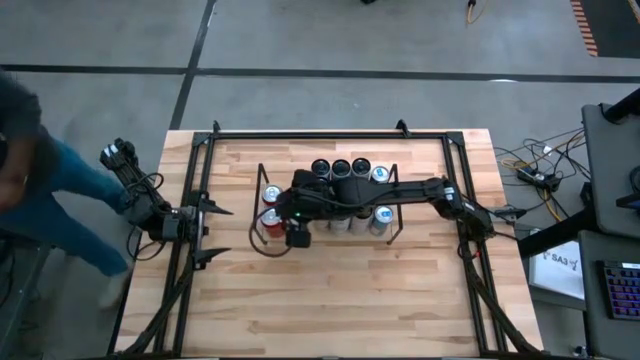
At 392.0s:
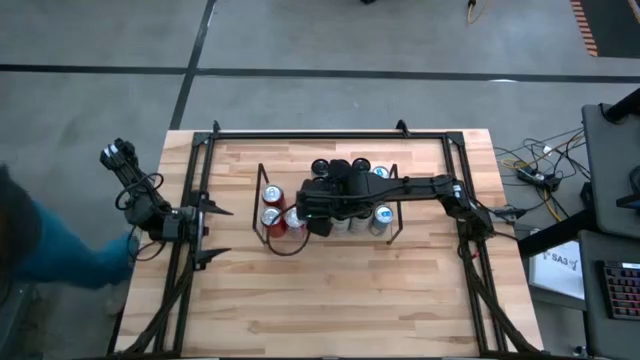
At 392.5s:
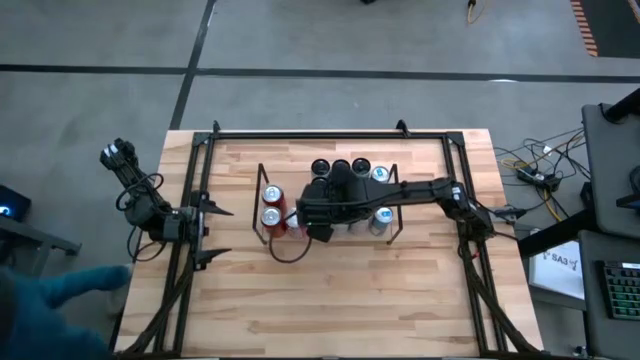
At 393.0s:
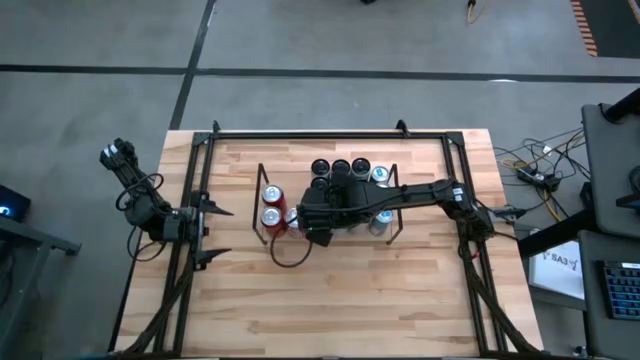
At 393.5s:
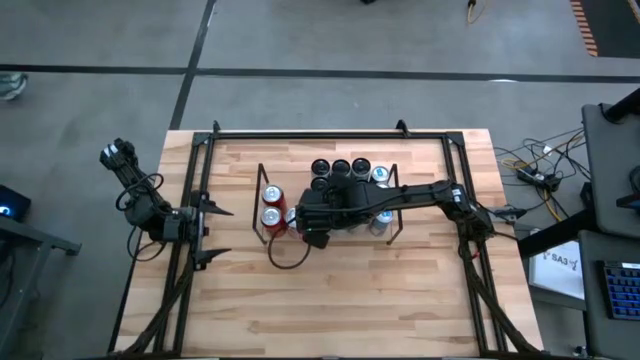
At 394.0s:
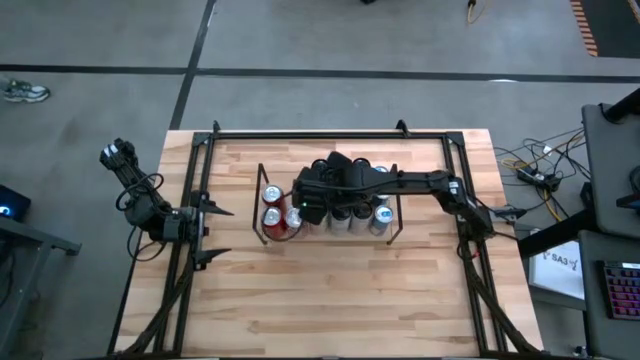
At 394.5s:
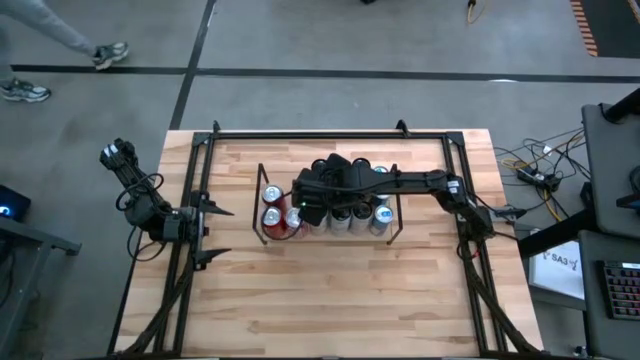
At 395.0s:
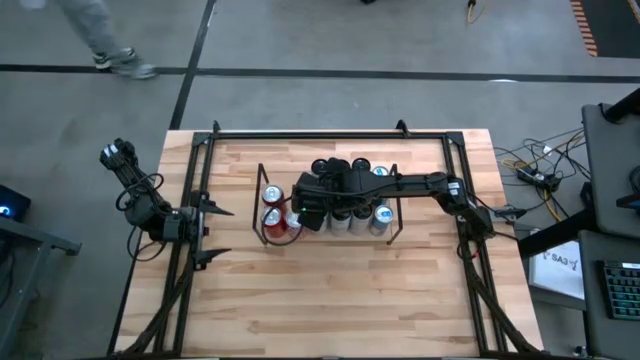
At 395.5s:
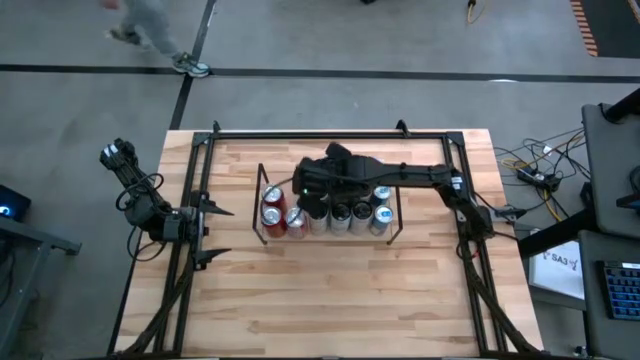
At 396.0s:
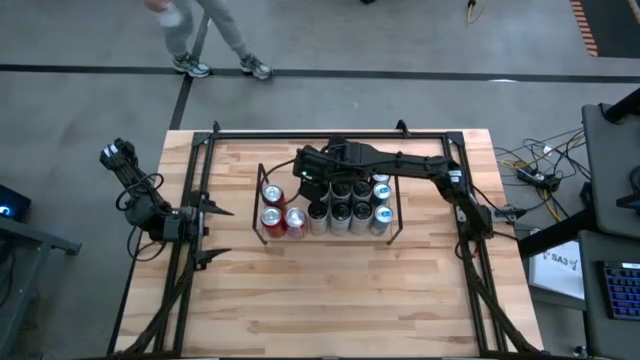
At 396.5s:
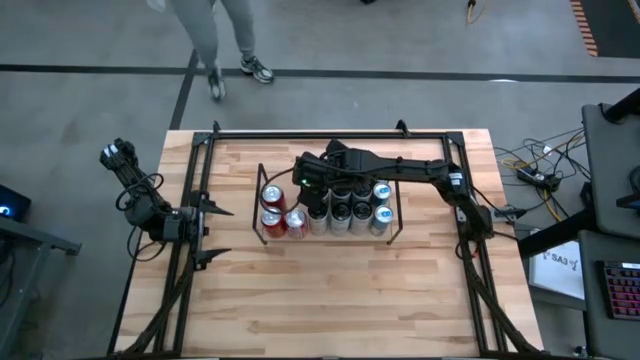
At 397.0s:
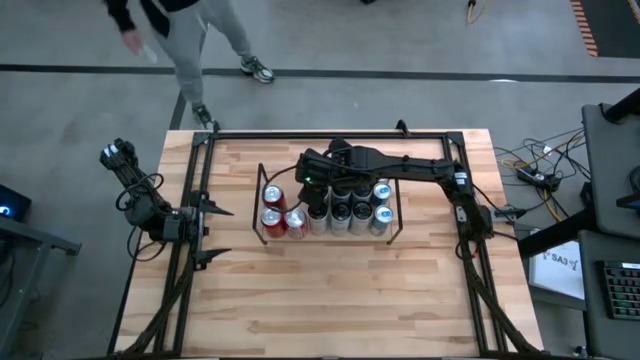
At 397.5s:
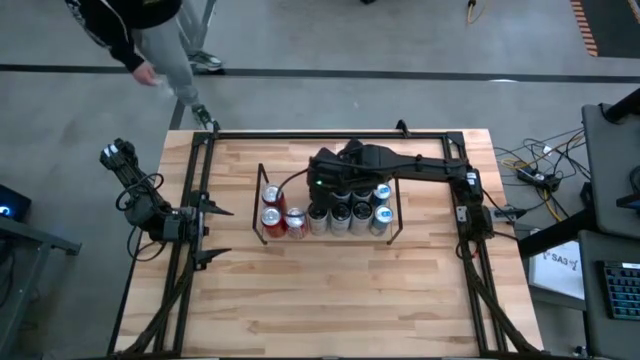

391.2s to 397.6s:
Task: Place canned beverage on shelf
Adjust the white and pink soda cans

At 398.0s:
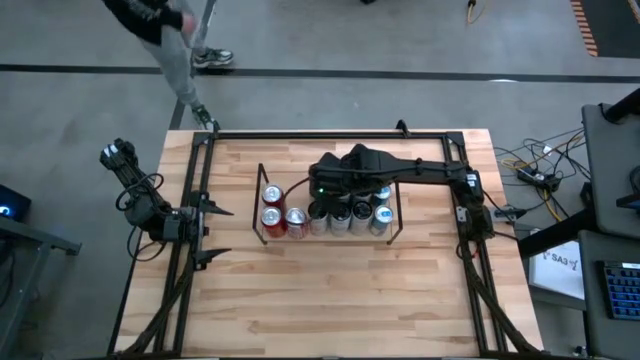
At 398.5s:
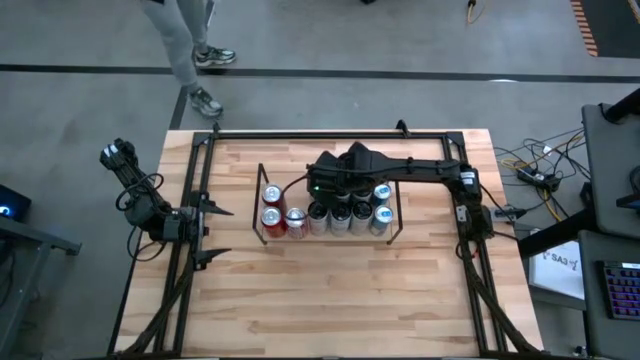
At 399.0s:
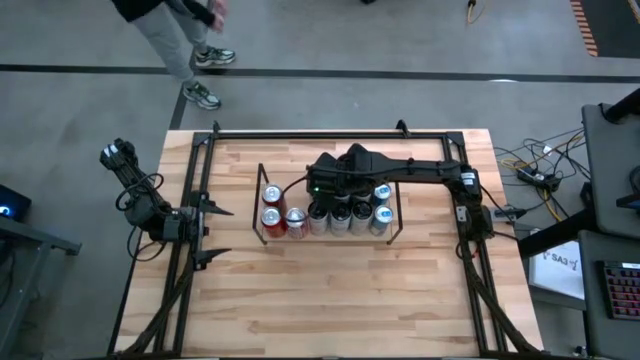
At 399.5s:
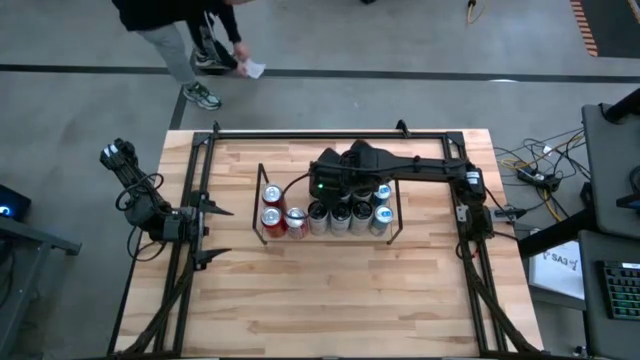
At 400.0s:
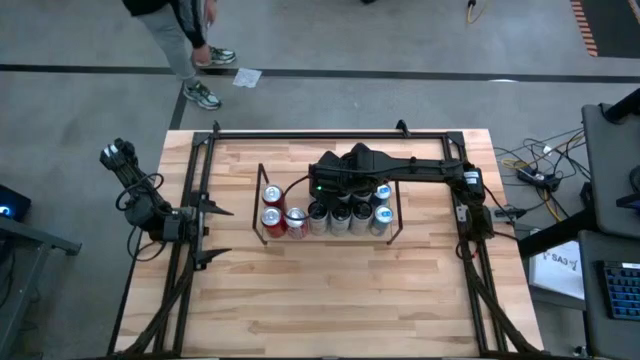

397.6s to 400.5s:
Adjust the white and blue soda cans

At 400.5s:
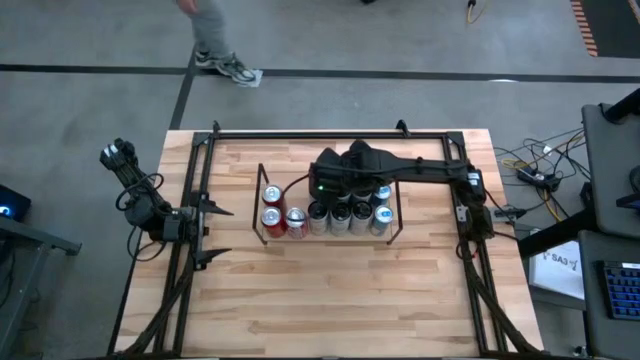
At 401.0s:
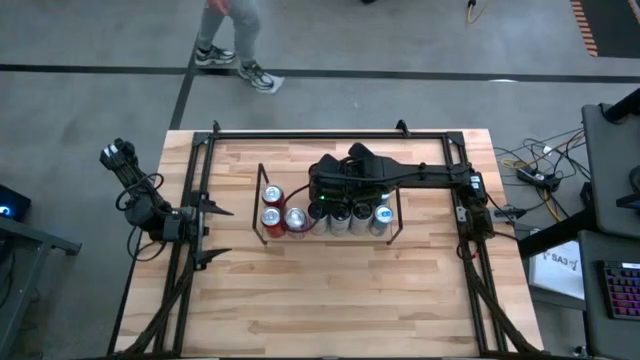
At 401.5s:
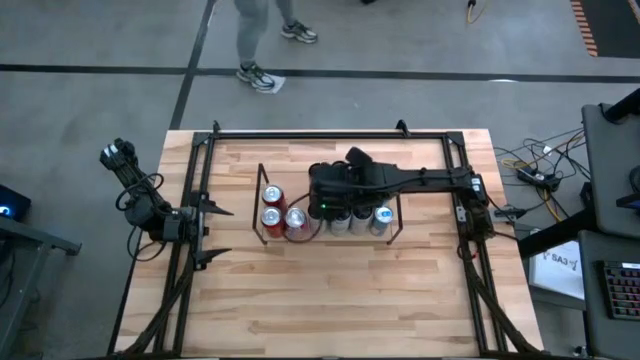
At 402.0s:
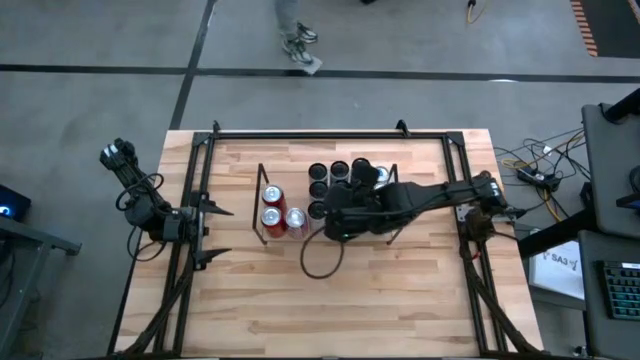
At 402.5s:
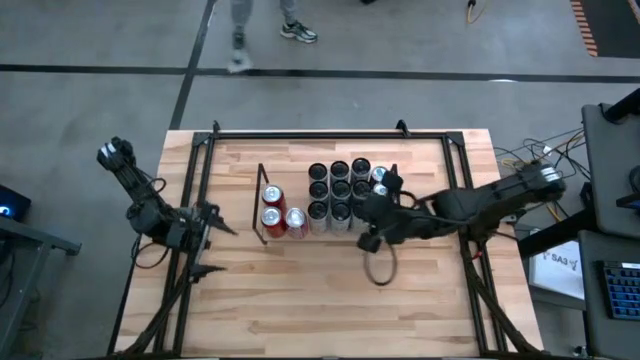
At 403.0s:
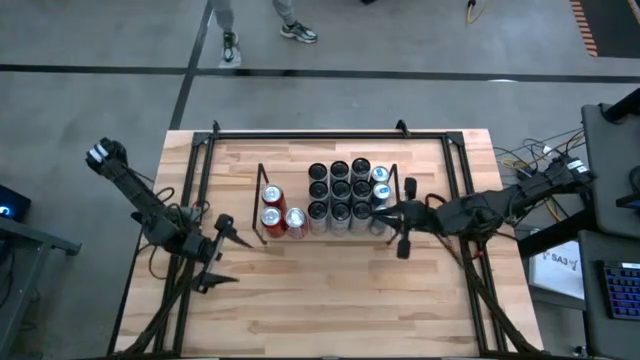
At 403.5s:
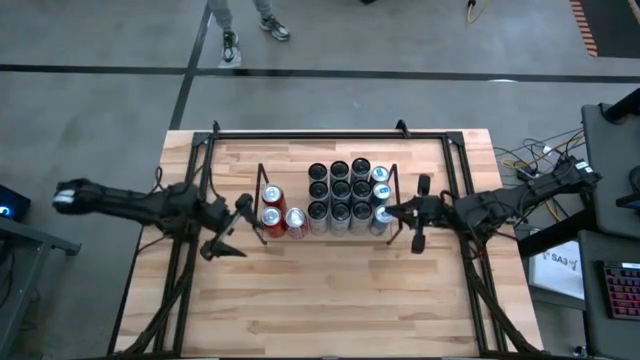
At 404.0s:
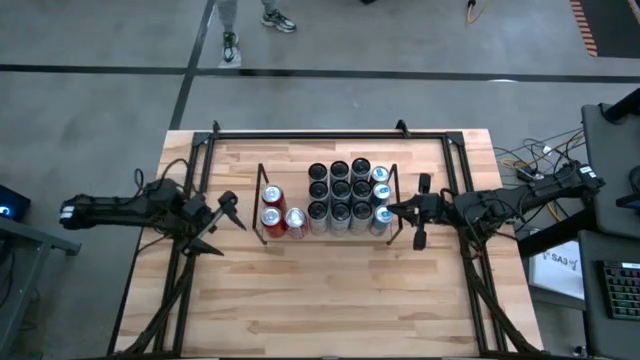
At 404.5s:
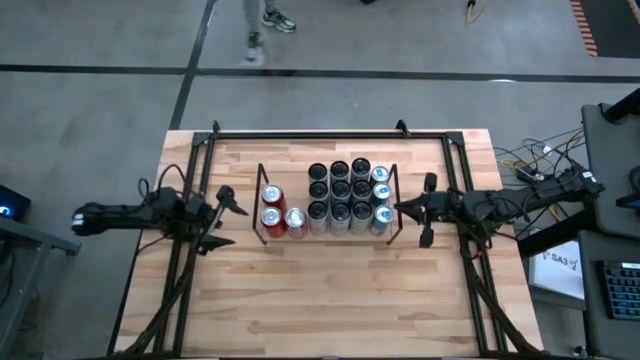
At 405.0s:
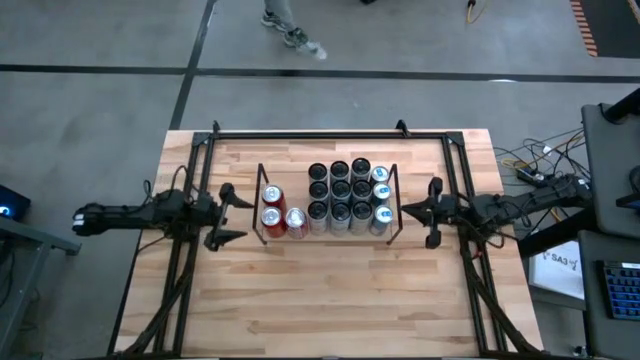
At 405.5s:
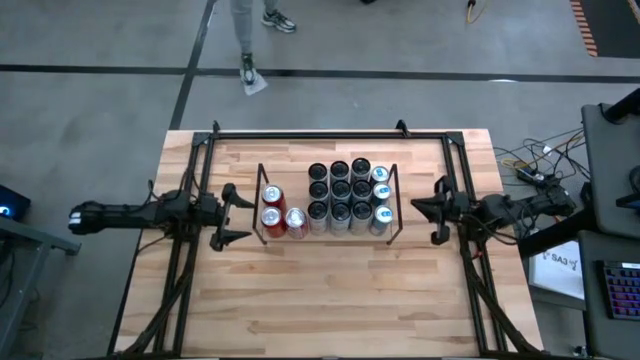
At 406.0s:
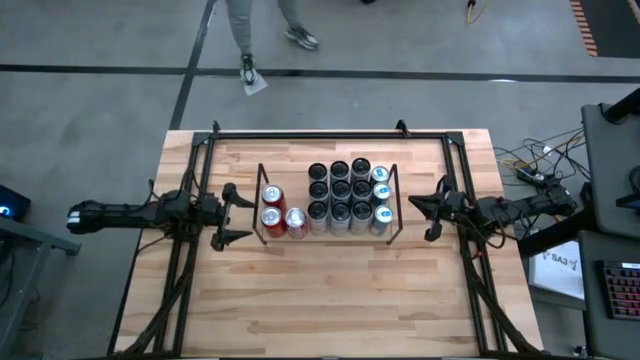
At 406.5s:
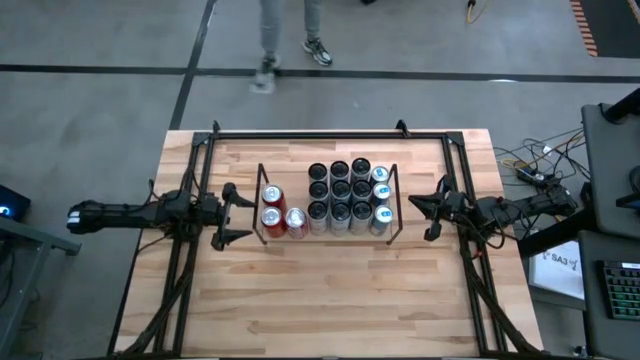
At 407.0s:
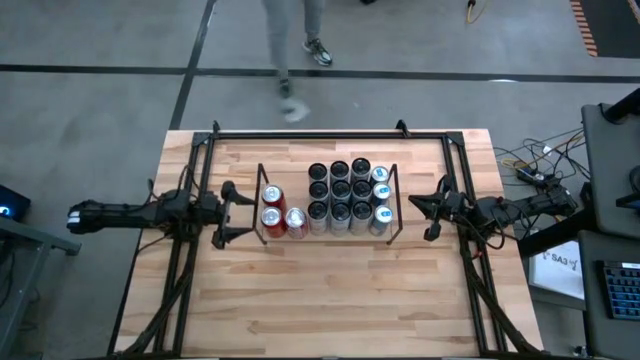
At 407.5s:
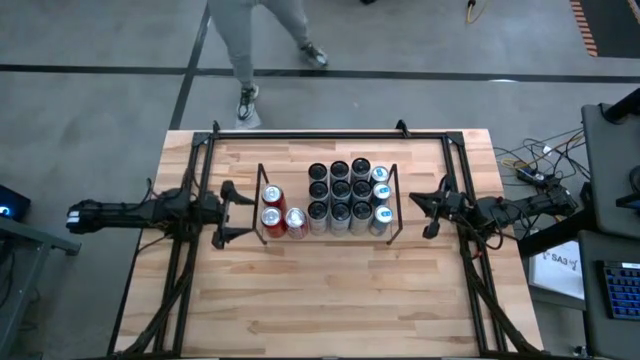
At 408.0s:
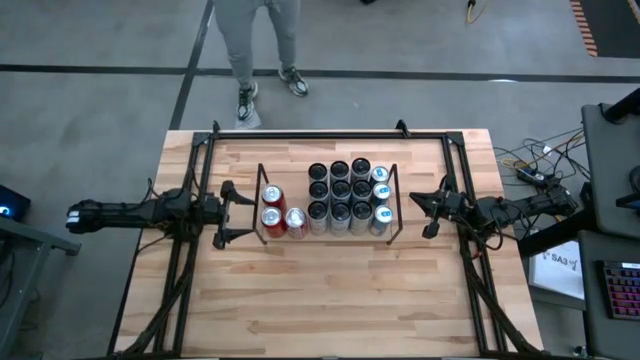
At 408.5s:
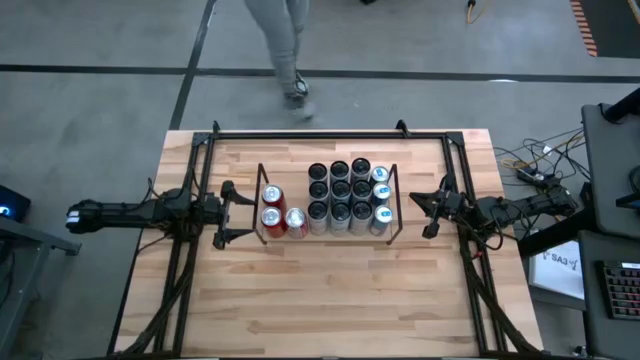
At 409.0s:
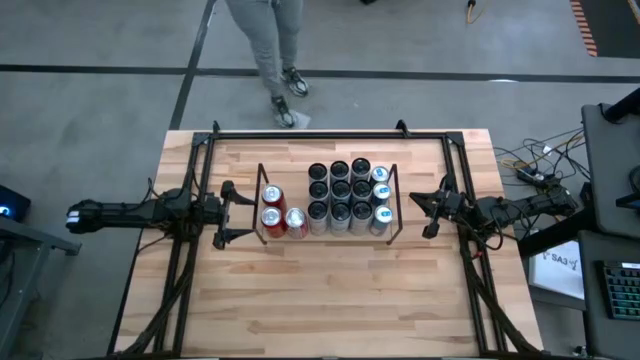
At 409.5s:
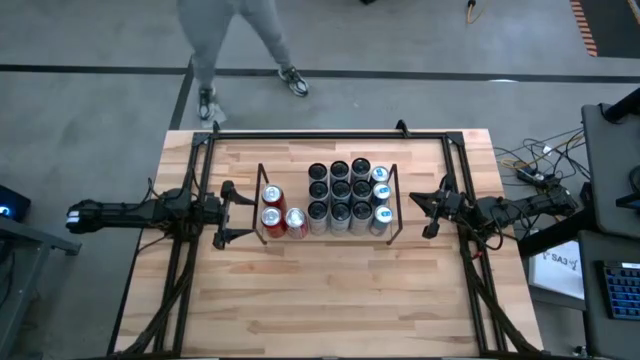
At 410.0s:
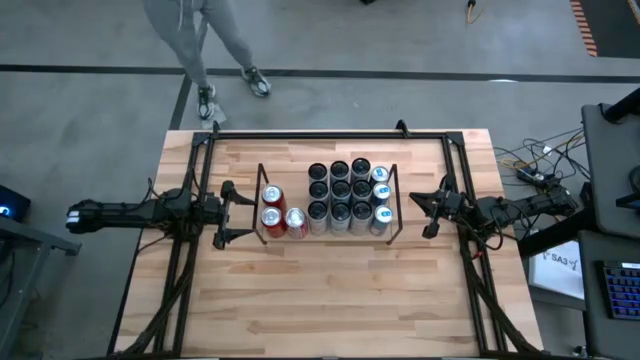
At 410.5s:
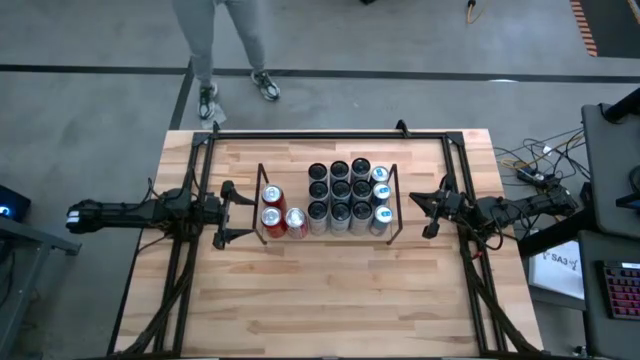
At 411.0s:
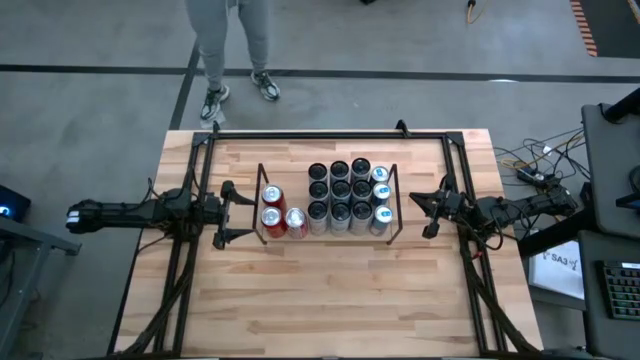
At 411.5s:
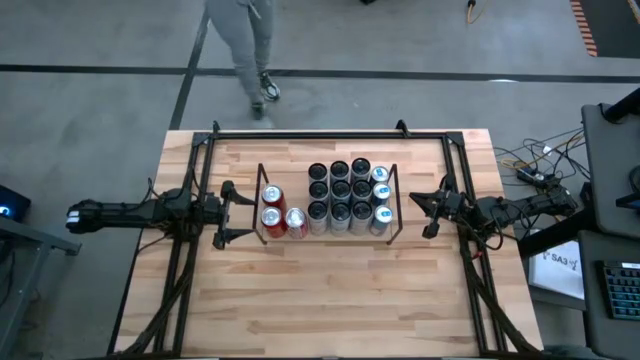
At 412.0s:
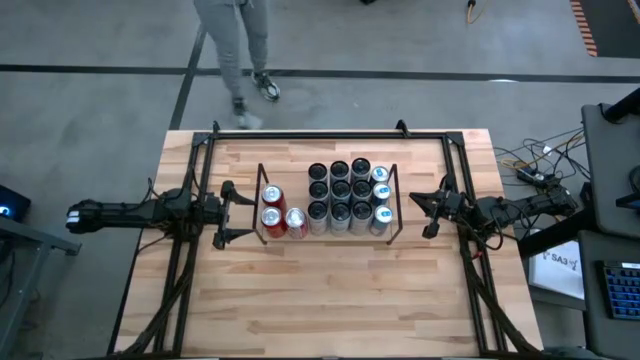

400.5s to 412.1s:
Return to Home Position

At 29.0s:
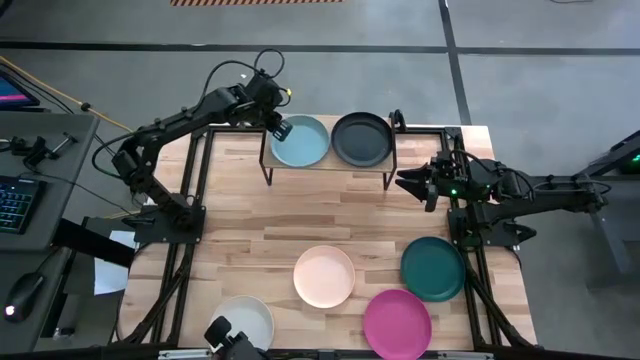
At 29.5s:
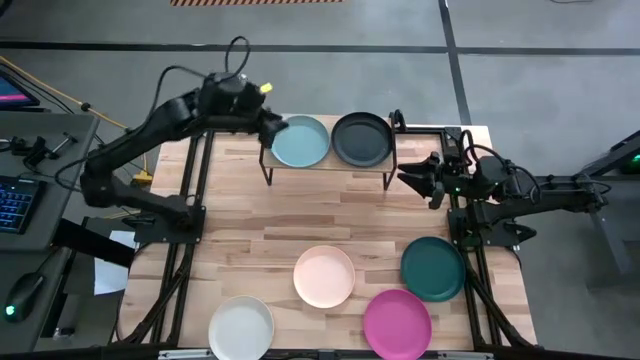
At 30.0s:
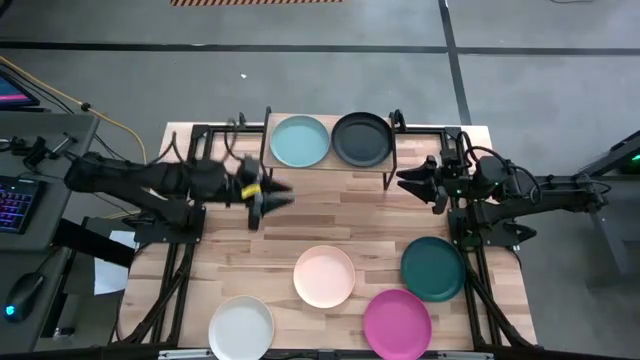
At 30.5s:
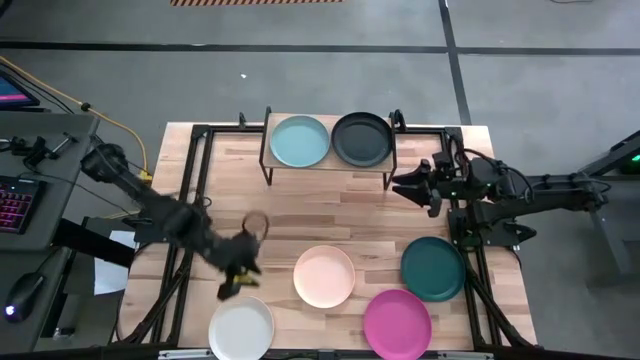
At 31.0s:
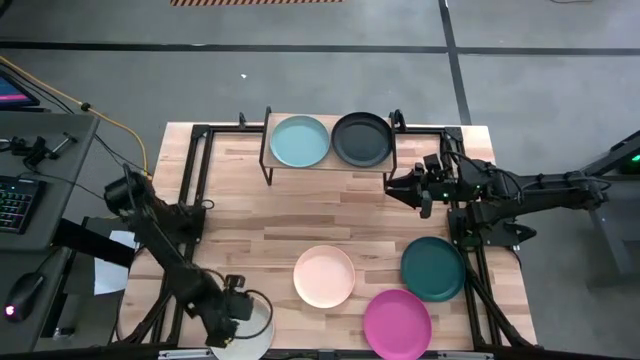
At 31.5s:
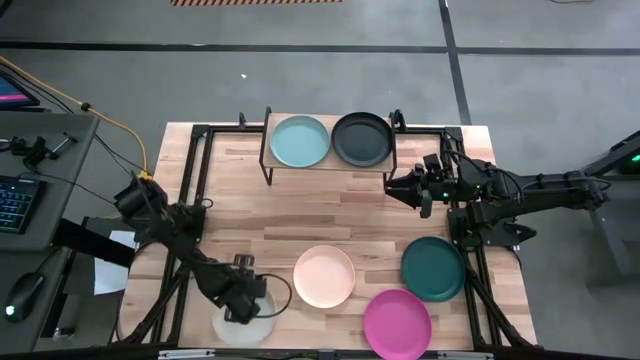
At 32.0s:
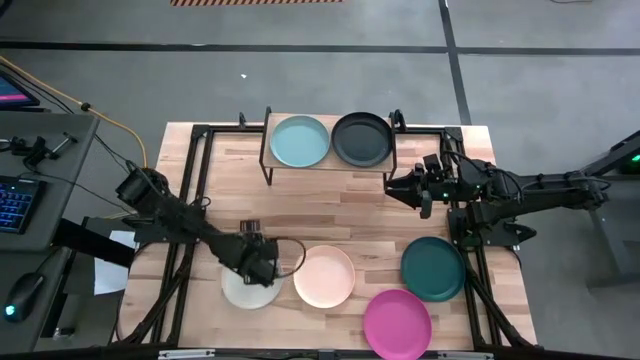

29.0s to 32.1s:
Task: Place and stack plates onto a shelf
Move the white plate to the left of the light pink plate on the table
